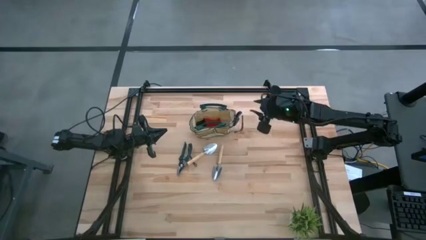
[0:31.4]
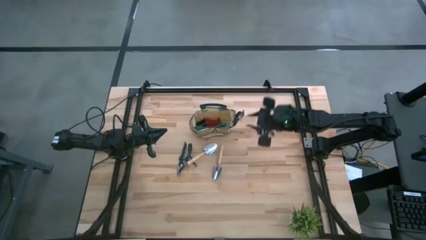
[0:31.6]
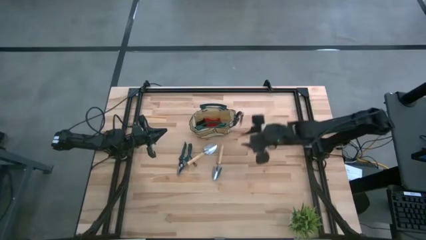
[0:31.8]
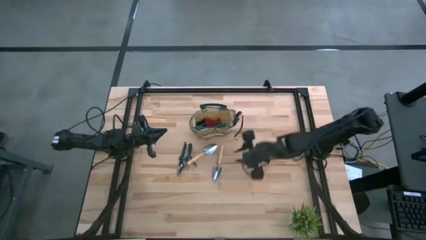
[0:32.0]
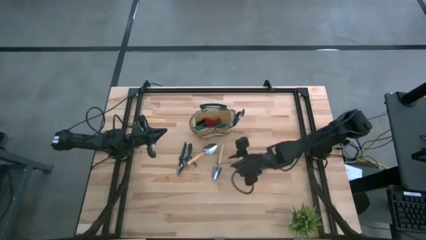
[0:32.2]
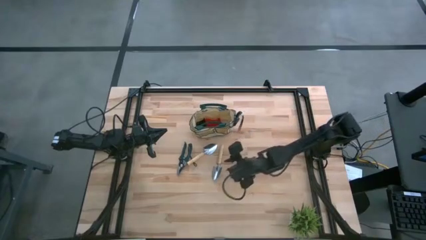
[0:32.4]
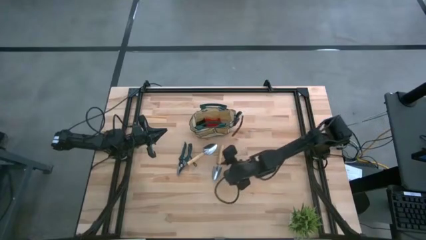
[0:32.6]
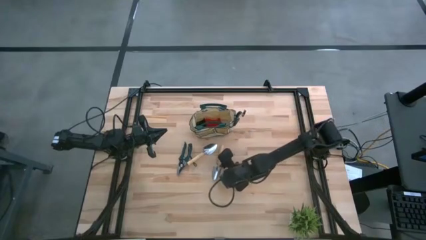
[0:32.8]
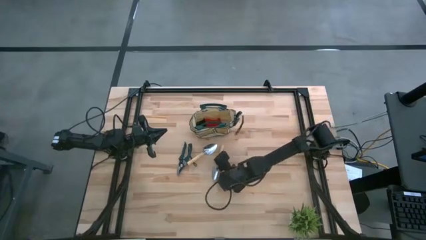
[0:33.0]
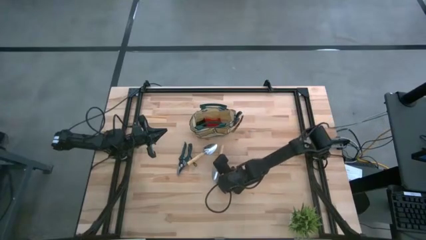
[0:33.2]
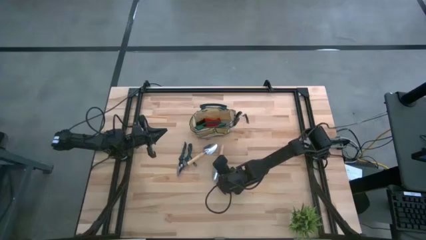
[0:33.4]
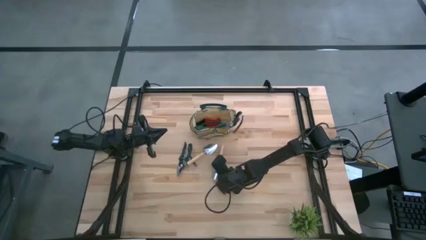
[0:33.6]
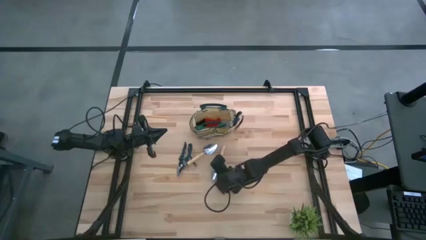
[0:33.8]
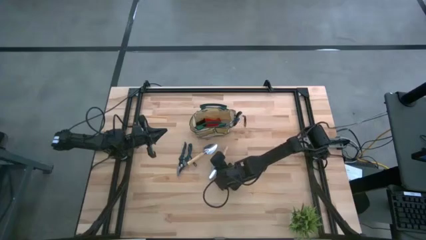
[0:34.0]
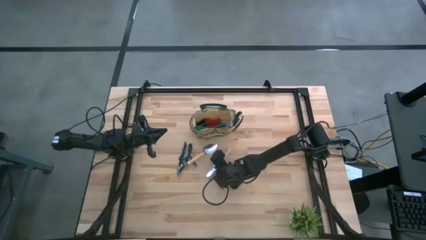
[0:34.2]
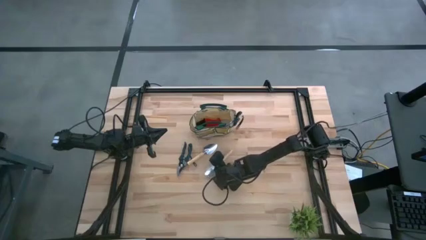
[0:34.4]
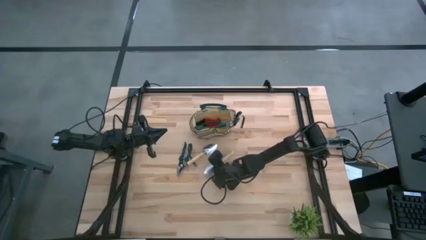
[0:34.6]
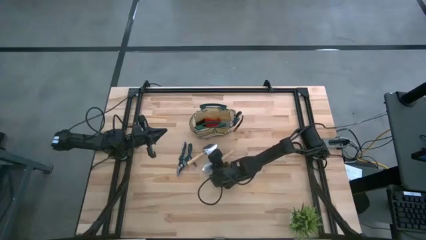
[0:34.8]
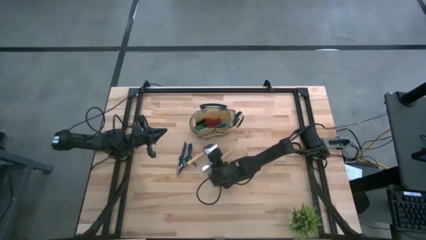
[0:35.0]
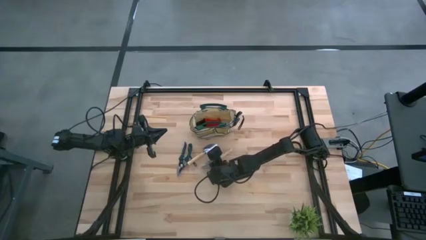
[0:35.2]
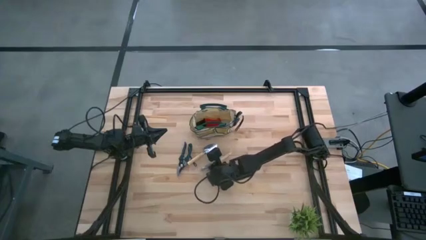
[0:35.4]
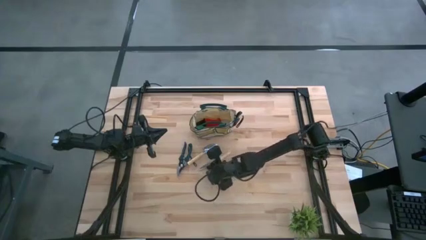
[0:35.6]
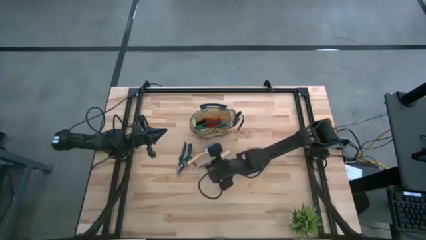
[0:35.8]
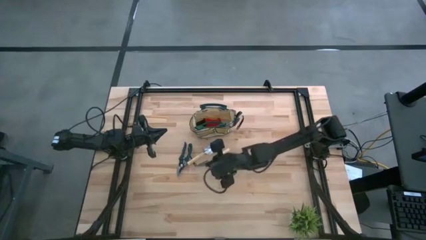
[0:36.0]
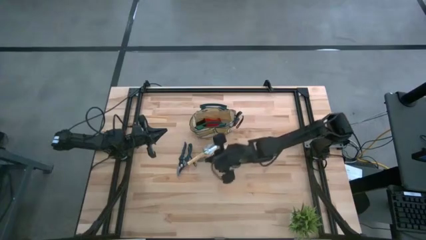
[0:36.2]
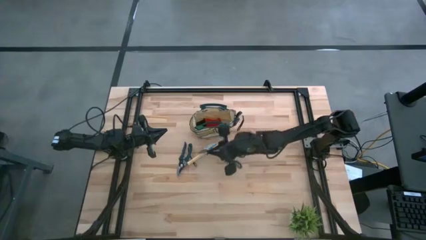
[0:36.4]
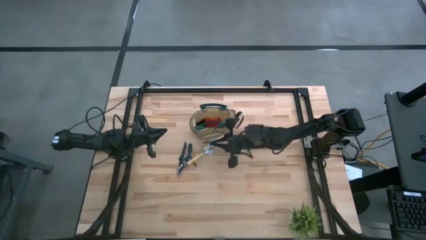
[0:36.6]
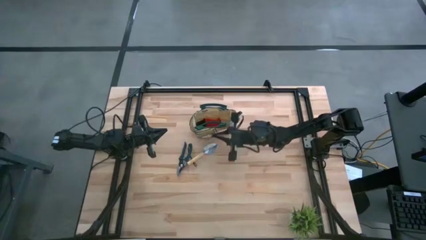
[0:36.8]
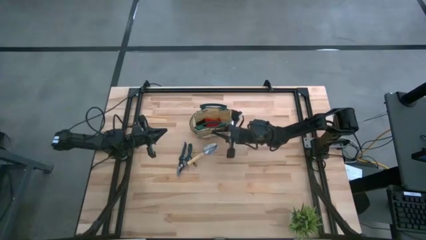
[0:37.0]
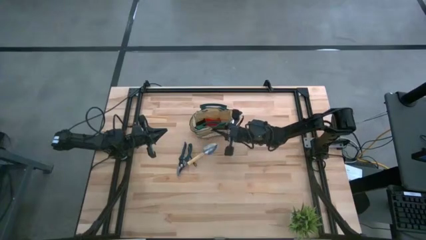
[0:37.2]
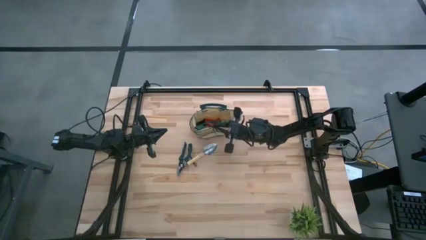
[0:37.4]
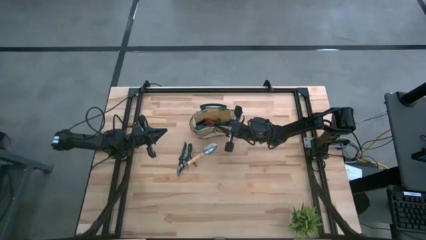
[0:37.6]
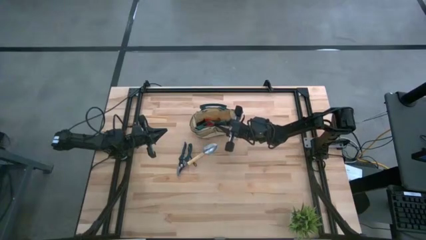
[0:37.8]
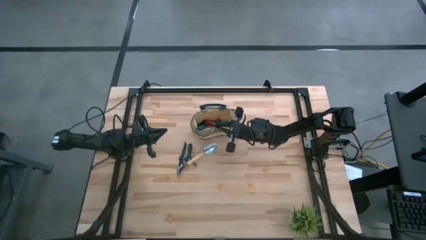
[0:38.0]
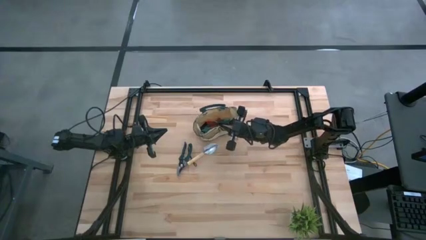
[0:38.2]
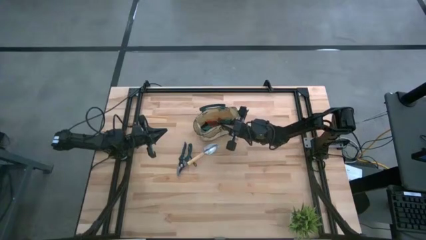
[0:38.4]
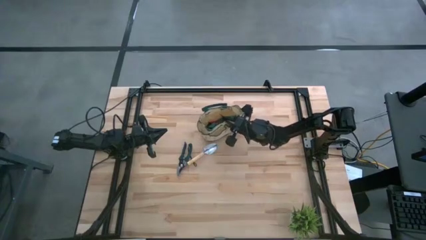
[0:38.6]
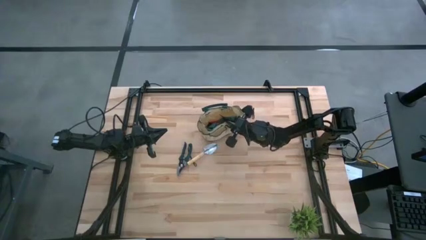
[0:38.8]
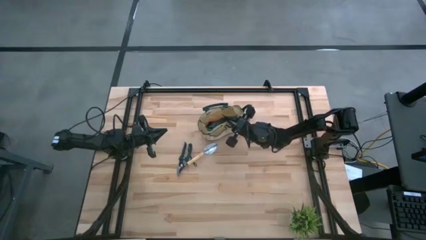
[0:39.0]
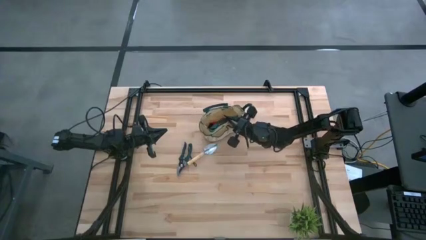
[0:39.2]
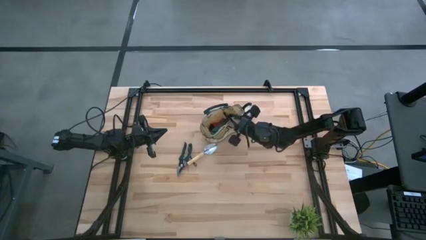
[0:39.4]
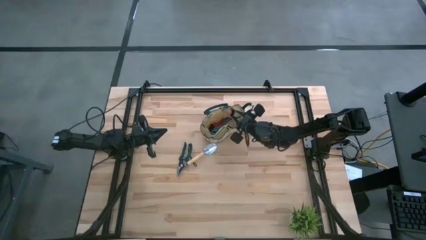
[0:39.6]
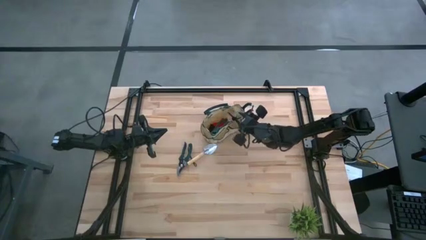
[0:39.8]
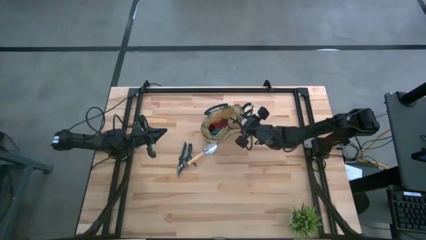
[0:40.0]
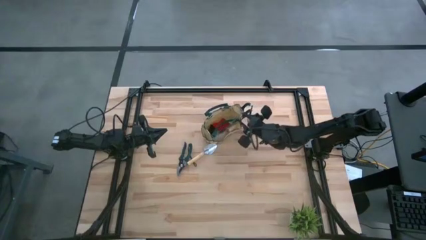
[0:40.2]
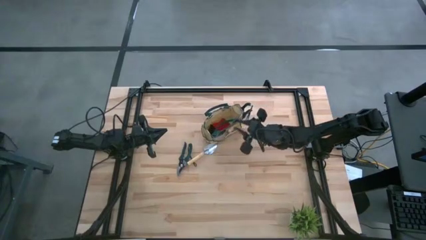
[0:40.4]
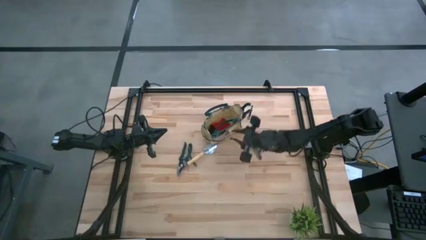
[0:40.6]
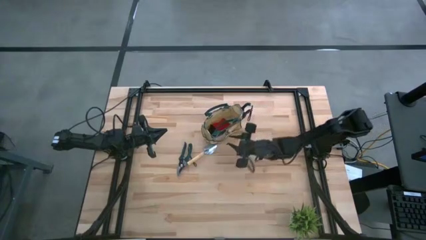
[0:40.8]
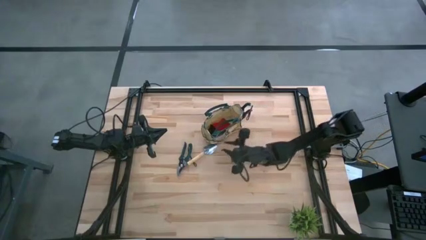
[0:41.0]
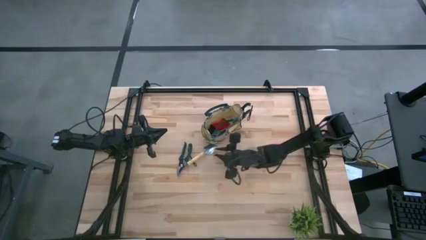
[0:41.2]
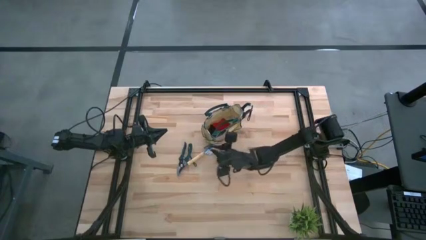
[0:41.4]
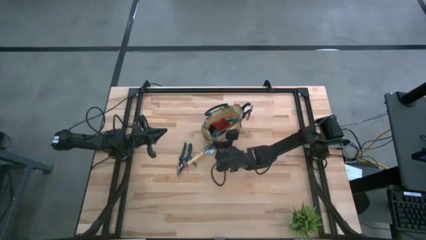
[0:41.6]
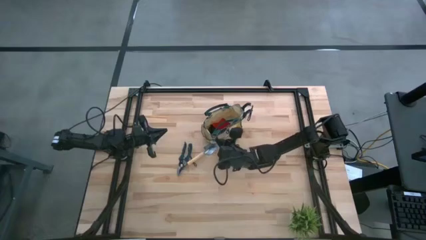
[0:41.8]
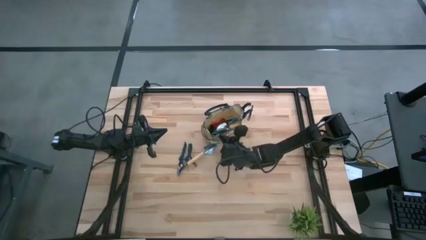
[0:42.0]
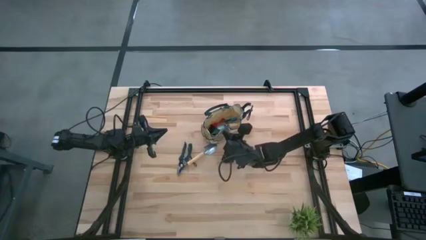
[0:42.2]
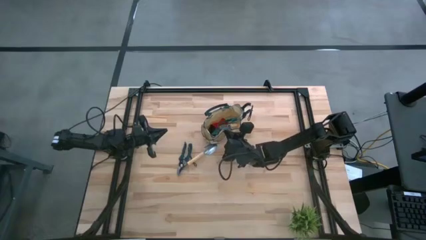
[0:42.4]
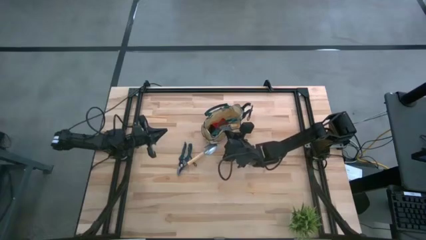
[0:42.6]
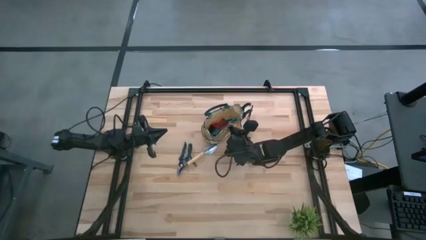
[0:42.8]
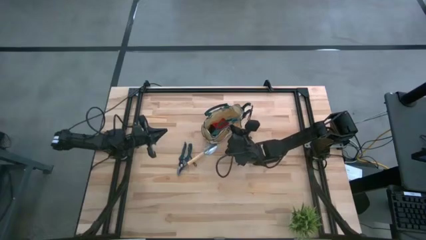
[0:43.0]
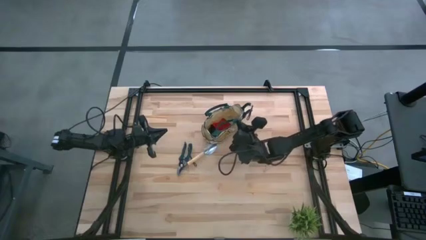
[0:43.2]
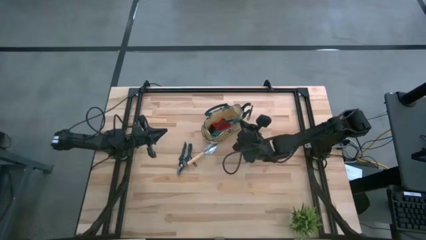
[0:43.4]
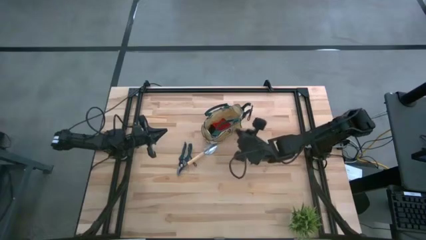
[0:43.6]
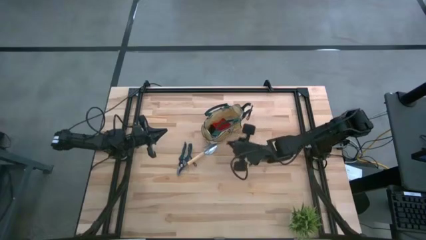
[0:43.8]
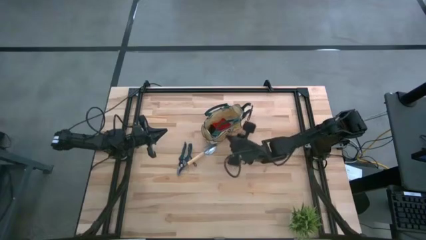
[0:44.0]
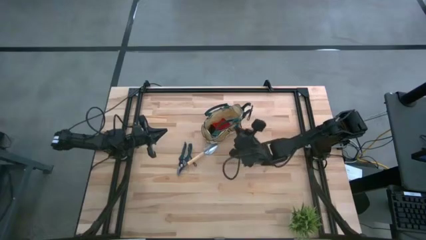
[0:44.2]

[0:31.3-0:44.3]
Task: Pick & Place Garden tools in Gardening bag
Put the right trowel into the gardening bag

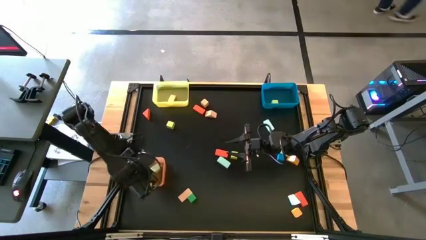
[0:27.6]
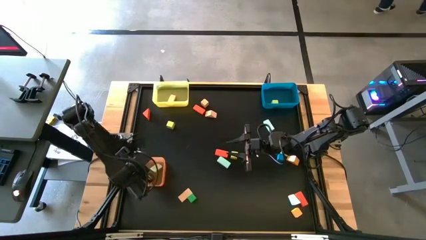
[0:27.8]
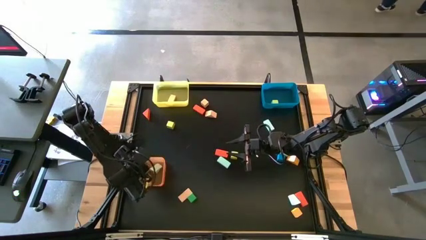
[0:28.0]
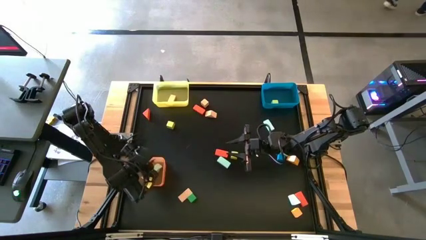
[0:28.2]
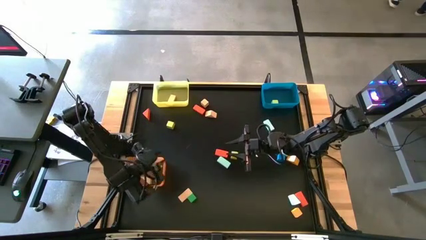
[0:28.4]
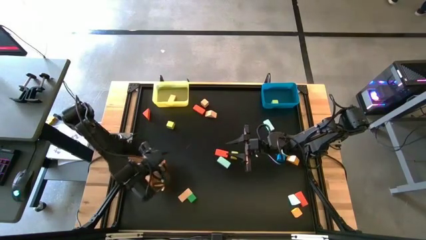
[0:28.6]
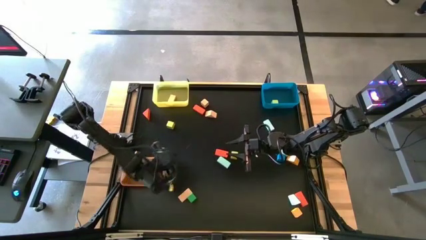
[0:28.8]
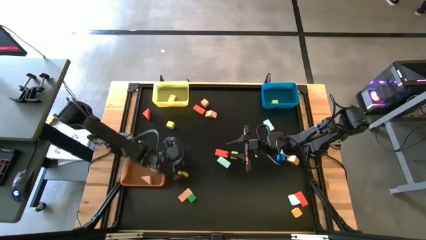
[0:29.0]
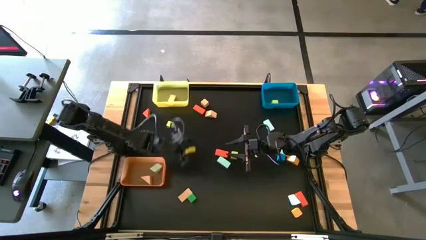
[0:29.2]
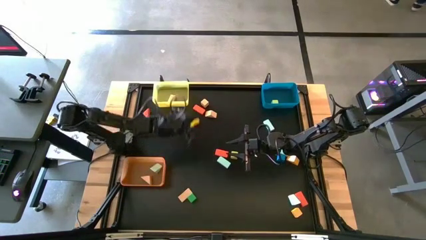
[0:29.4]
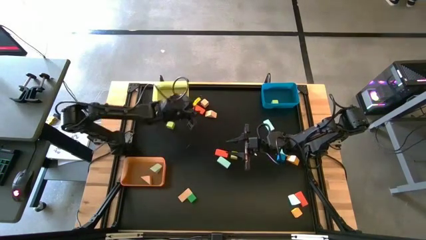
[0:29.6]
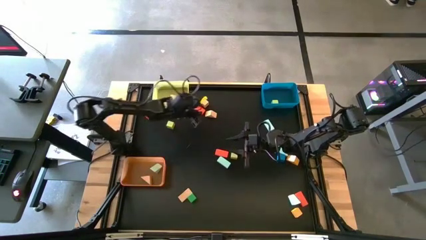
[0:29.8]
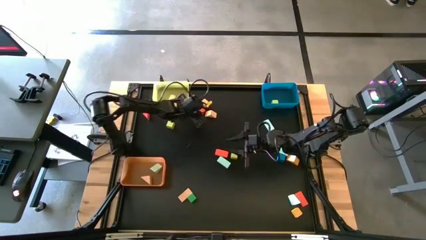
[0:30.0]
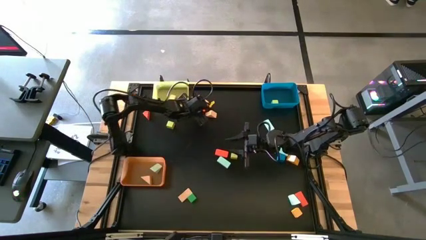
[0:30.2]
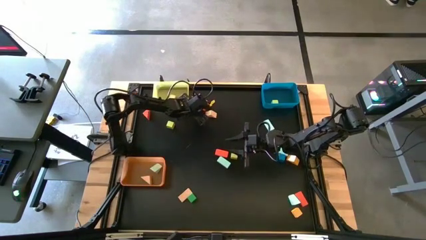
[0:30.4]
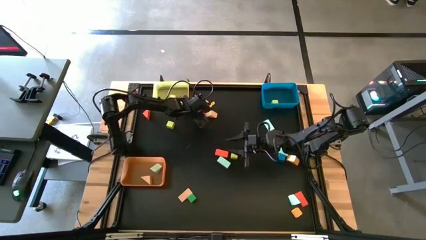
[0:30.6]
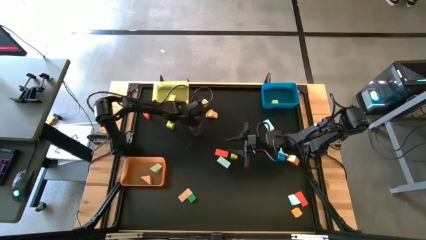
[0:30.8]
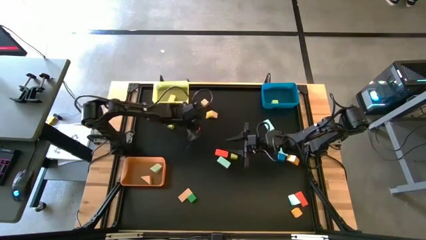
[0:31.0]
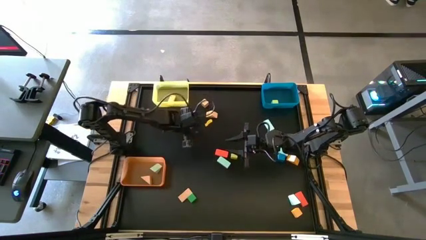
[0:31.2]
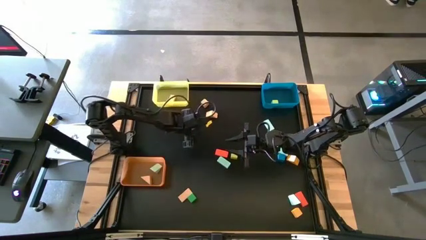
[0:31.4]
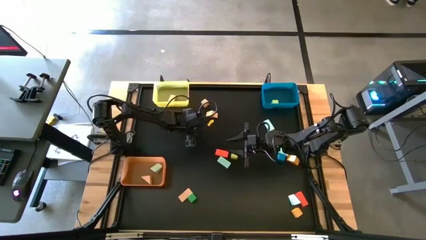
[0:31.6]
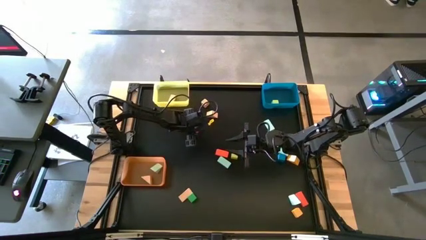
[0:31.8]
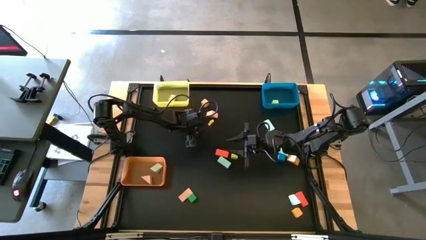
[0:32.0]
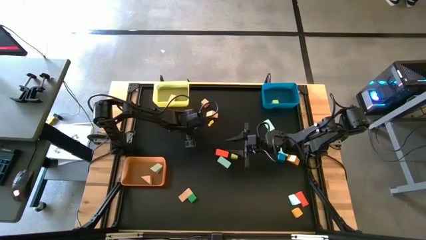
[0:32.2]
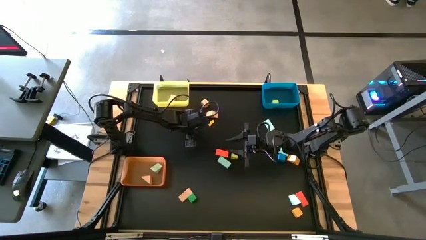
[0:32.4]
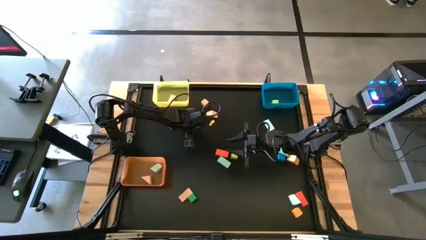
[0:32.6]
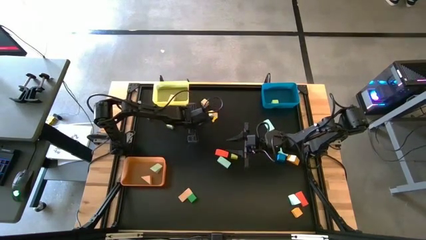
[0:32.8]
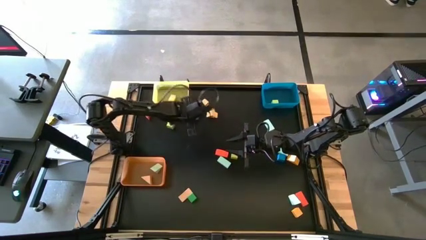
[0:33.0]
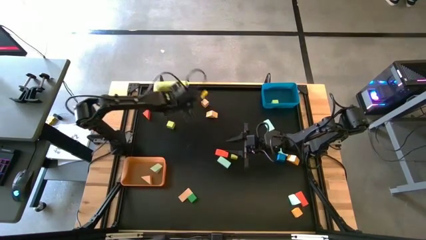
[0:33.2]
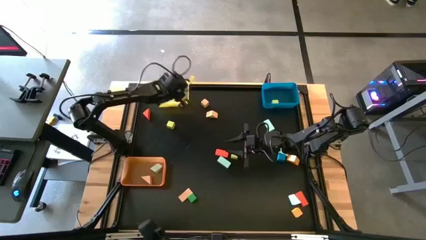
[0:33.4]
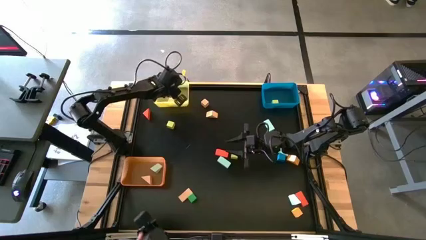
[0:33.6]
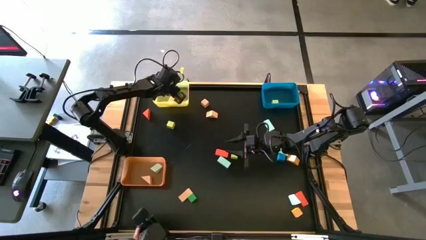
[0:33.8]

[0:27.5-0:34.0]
Task: Sort blocks by size
Put the orange wooden block into the yellow bin
